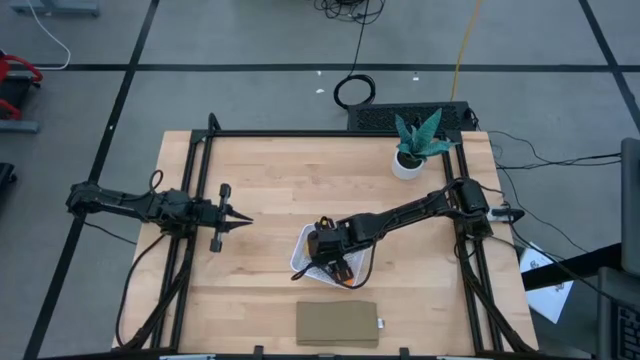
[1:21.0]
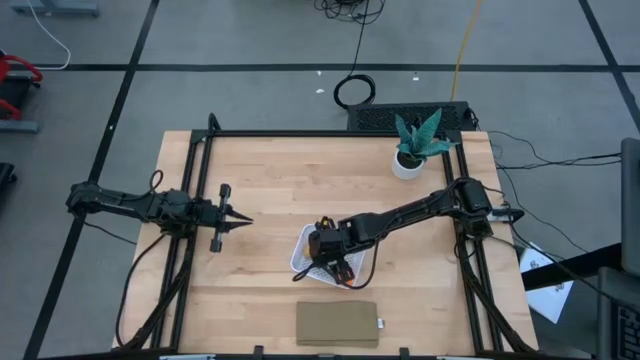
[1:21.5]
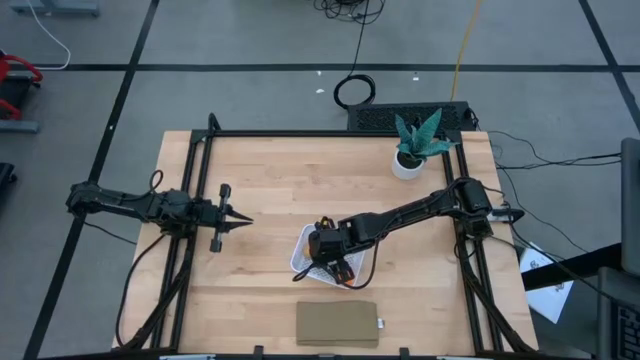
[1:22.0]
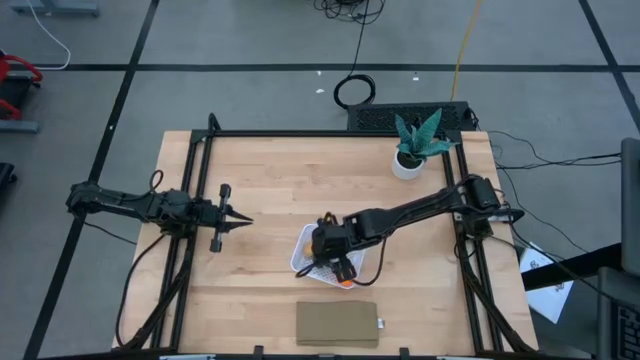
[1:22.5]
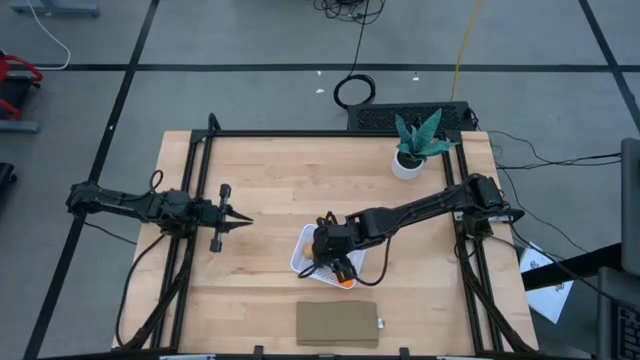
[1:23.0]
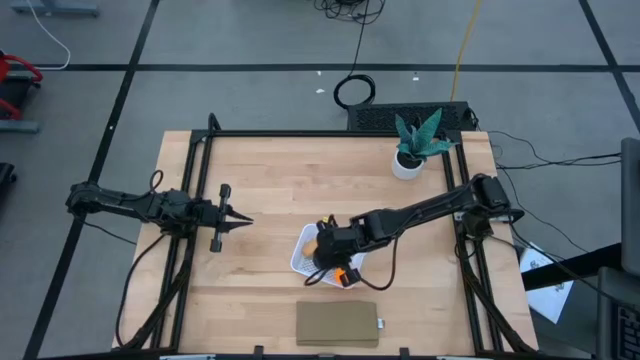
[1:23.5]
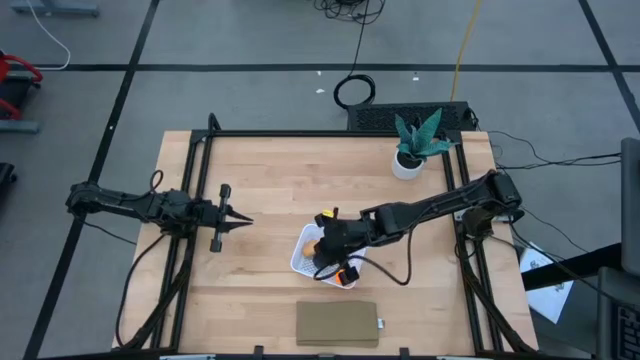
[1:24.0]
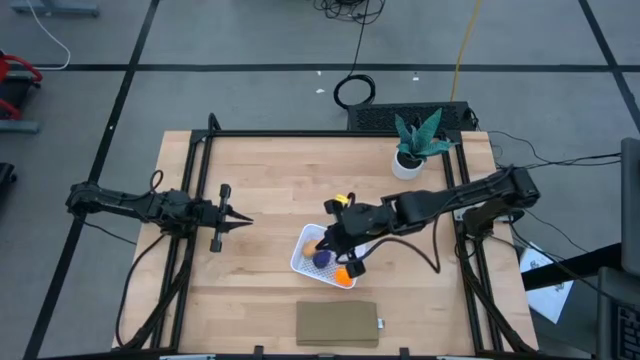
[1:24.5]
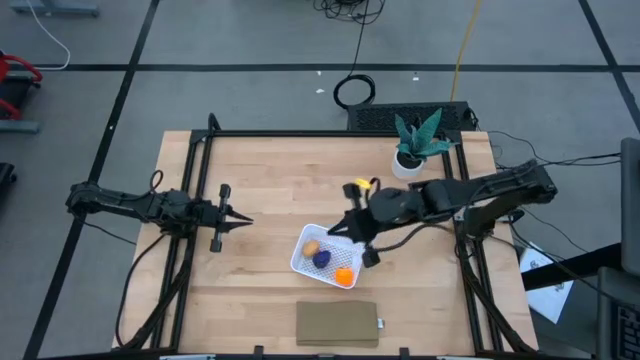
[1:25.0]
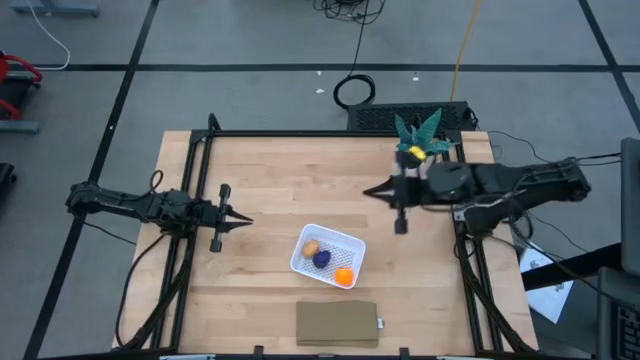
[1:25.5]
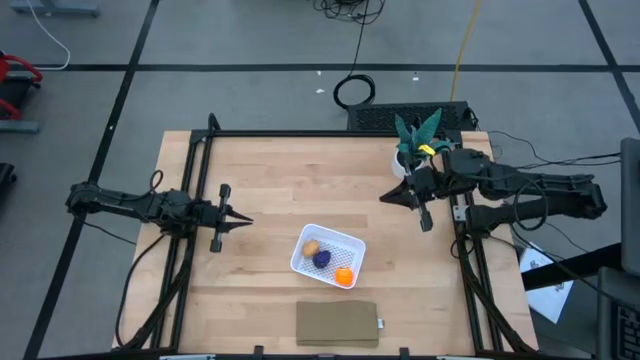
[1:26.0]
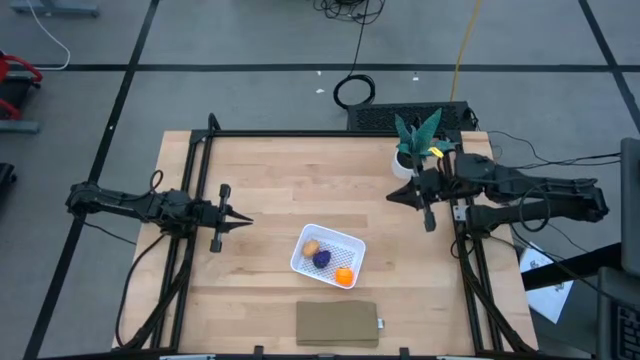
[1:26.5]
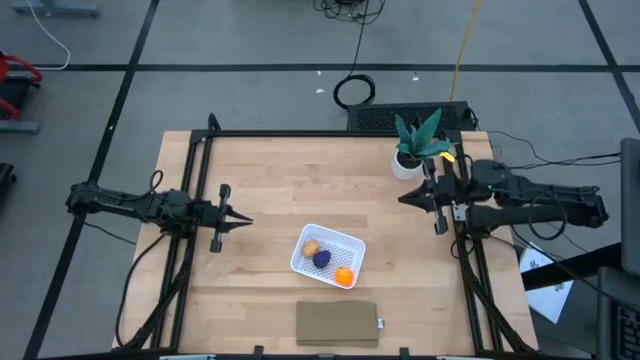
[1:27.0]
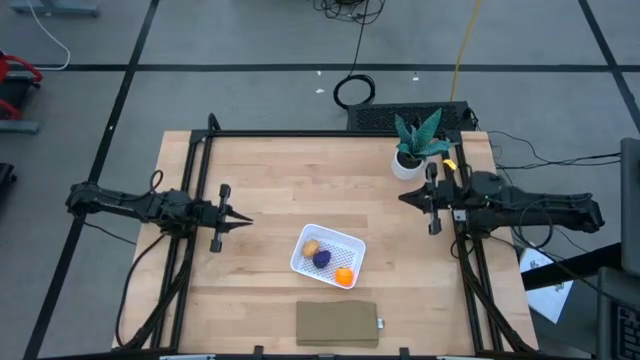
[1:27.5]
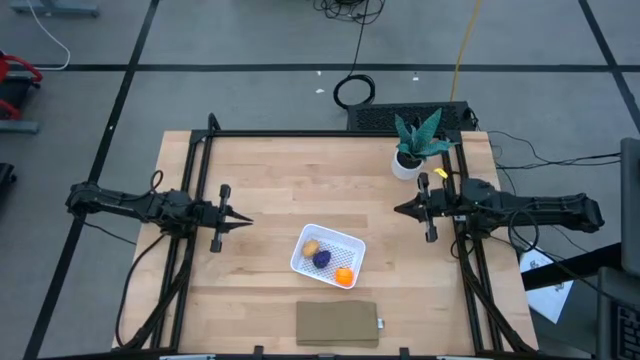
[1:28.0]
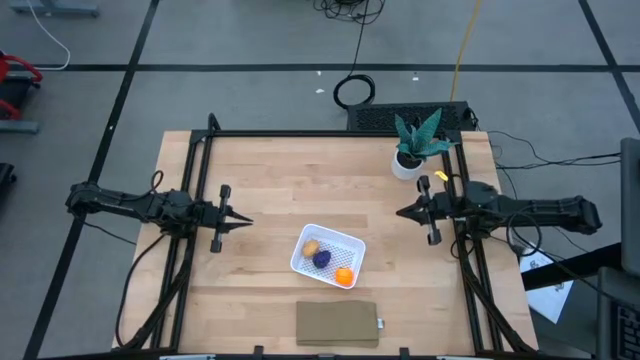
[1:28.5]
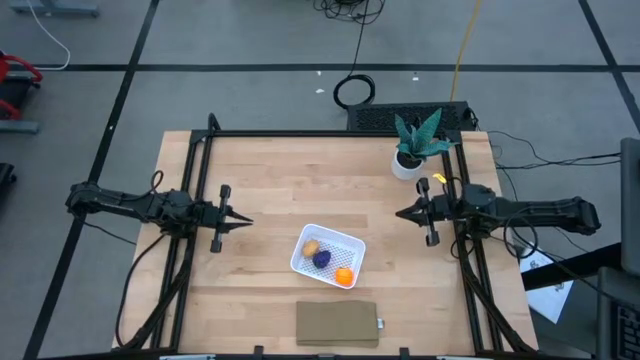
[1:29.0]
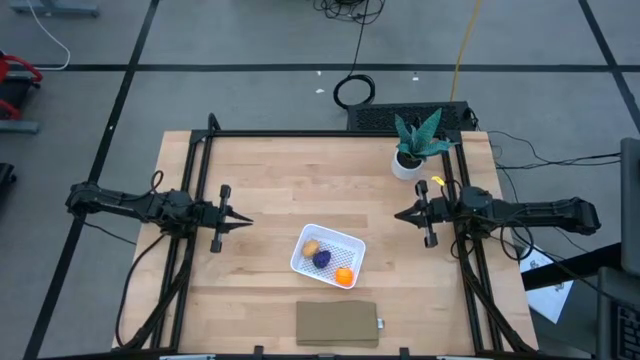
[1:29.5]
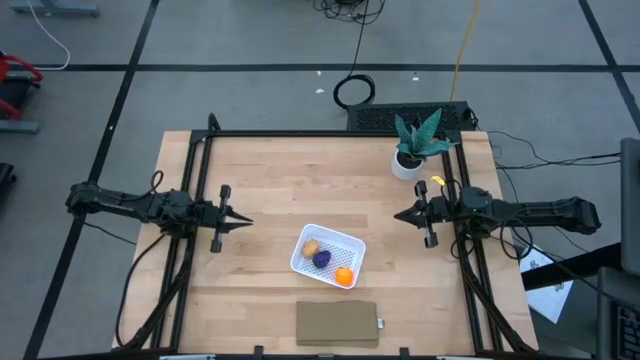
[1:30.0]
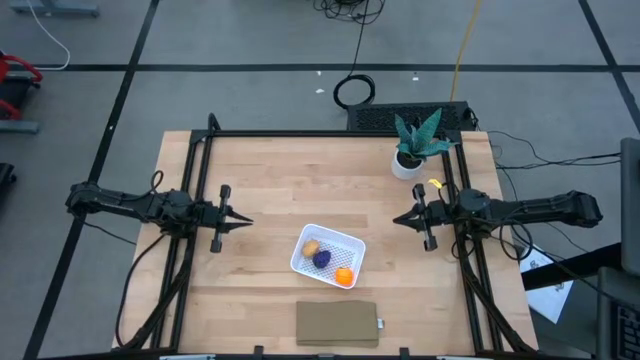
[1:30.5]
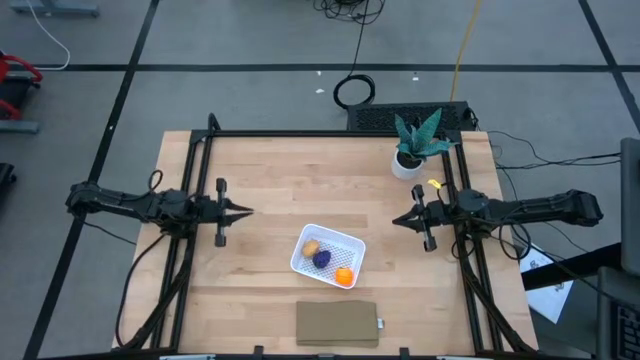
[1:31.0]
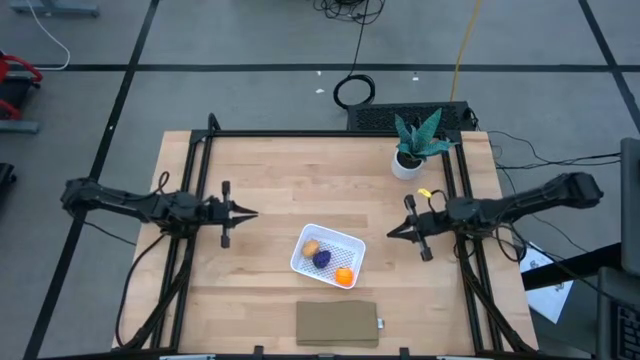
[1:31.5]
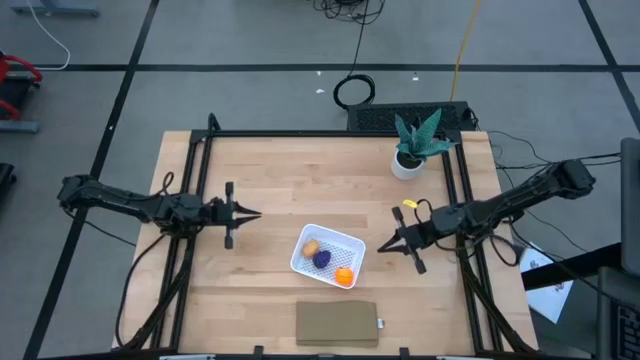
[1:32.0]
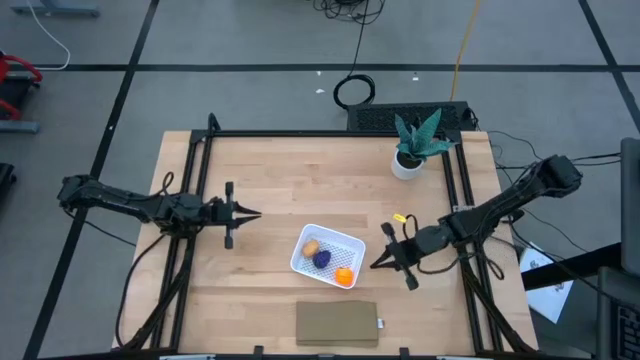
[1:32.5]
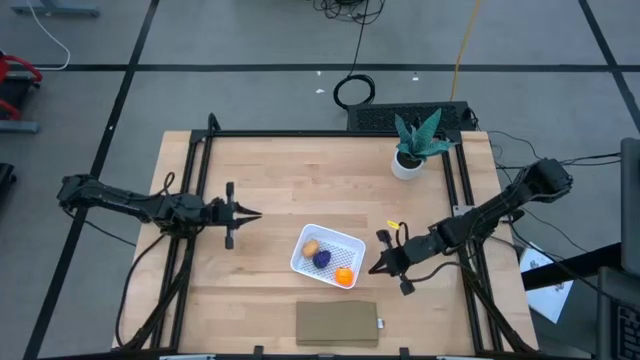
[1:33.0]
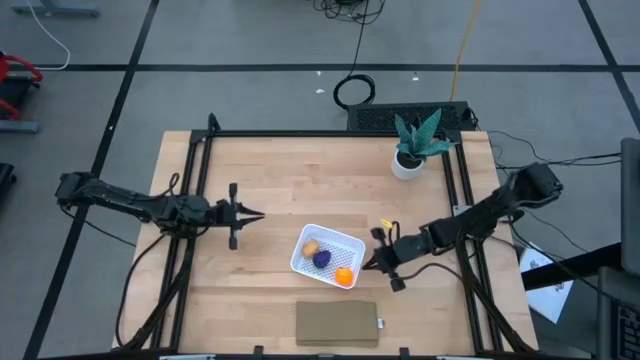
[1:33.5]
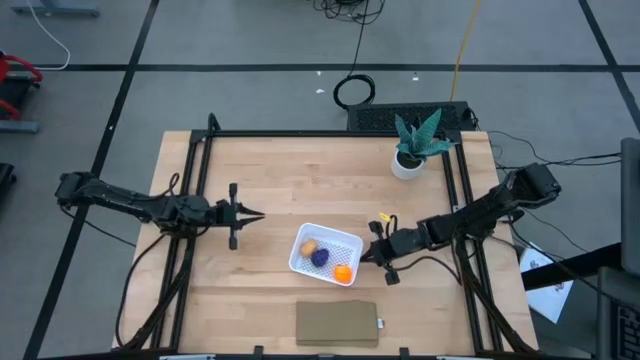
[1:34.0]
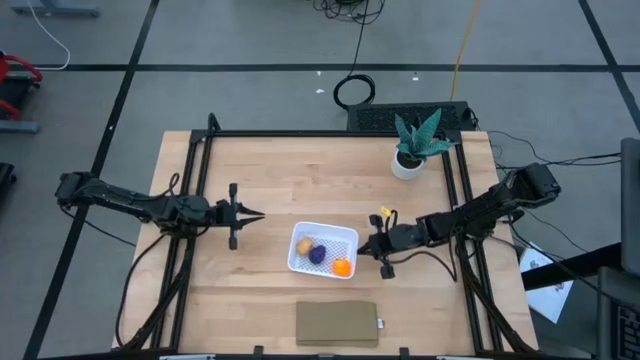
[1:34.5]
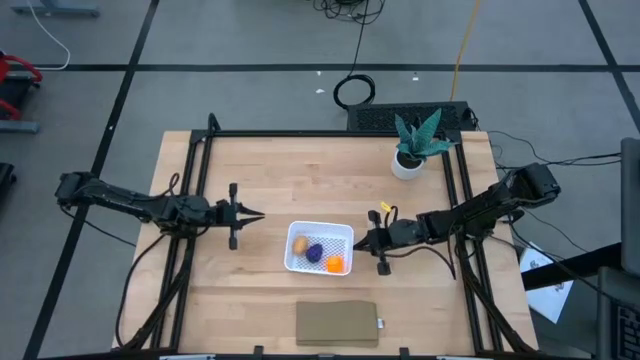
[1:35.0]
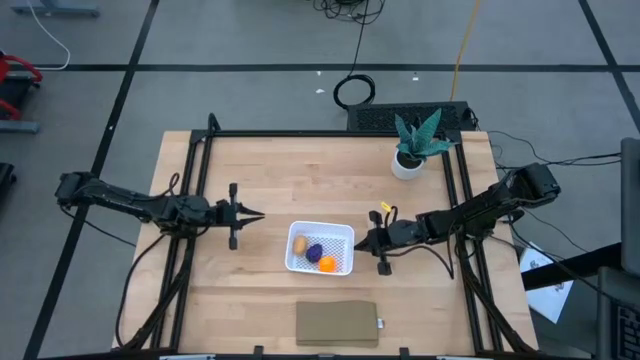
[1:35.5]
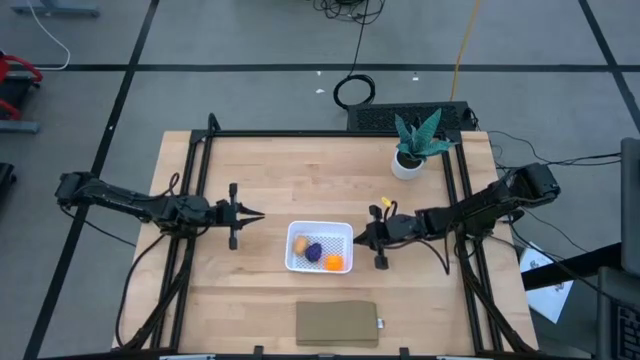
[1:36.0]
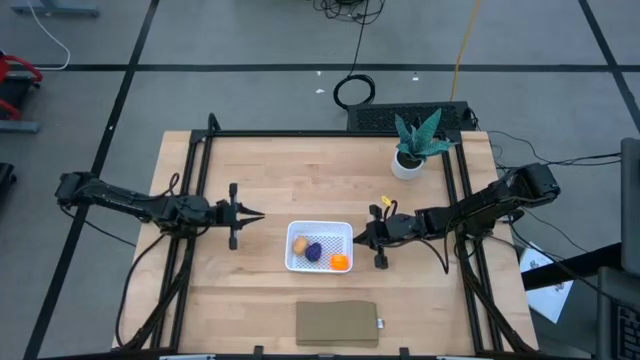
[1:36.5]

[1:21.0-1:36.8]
Task: Pick and placing Produce into tupperware
Adjust the basket

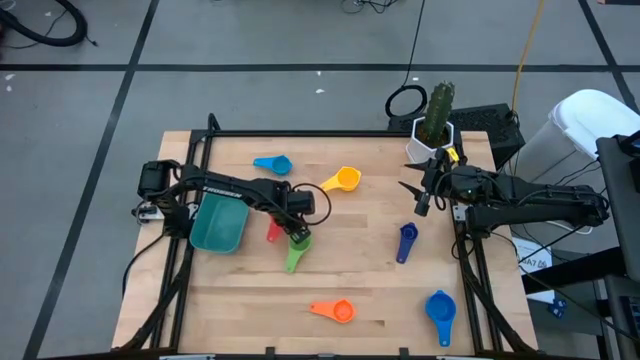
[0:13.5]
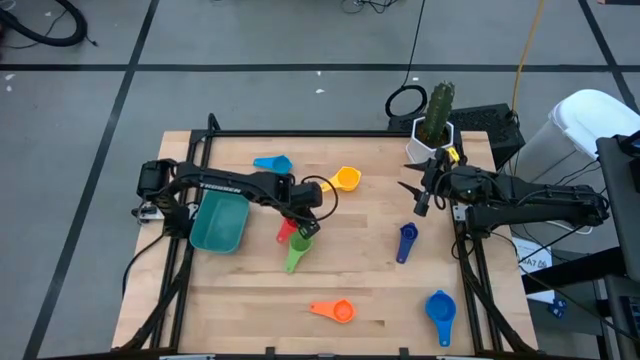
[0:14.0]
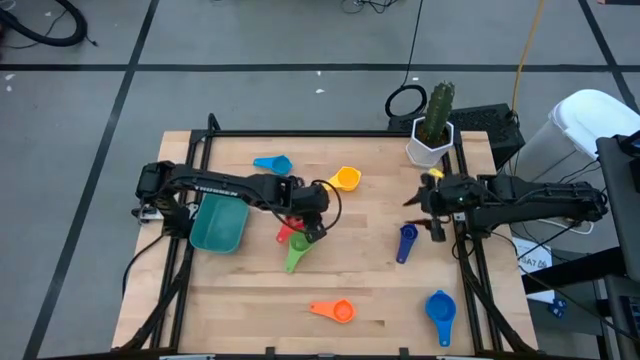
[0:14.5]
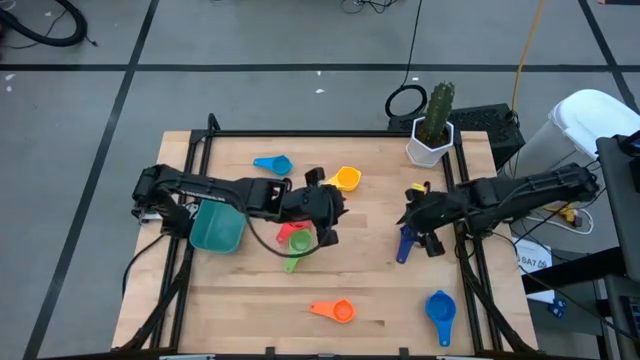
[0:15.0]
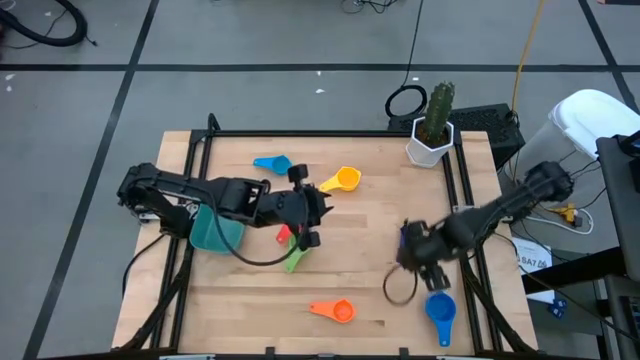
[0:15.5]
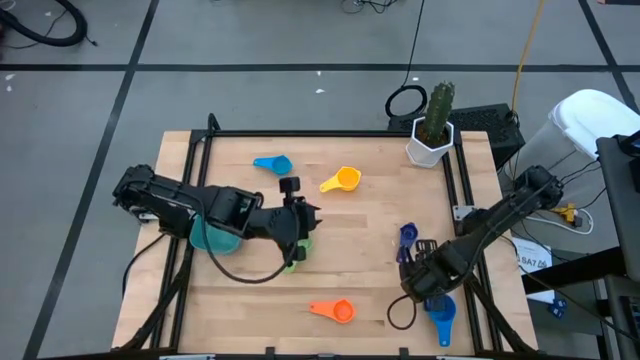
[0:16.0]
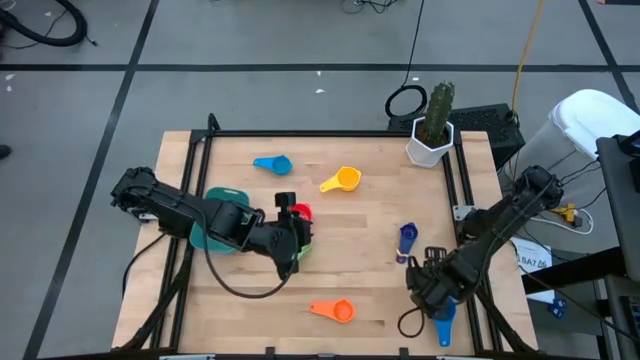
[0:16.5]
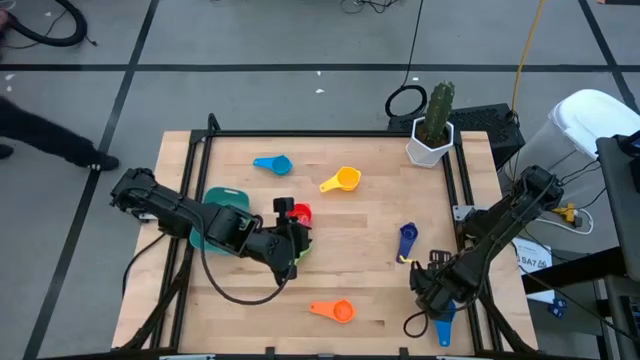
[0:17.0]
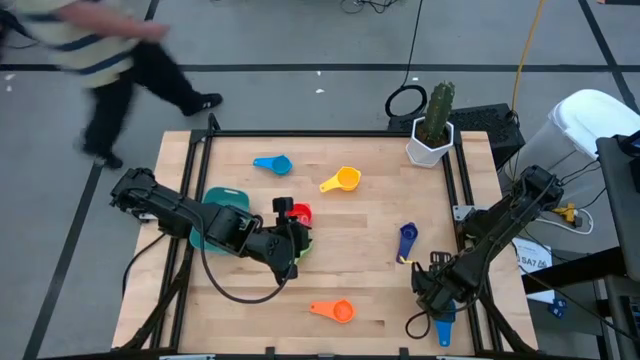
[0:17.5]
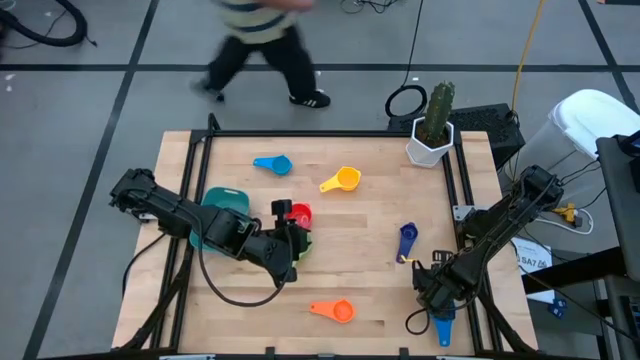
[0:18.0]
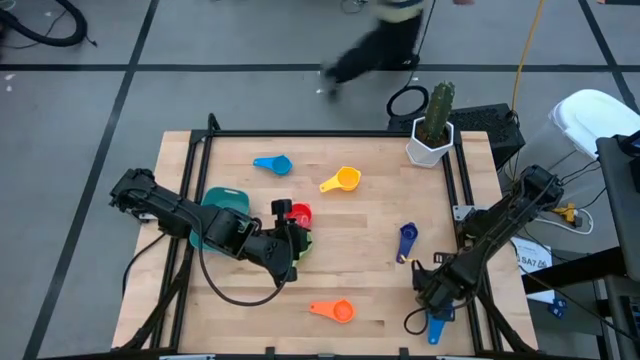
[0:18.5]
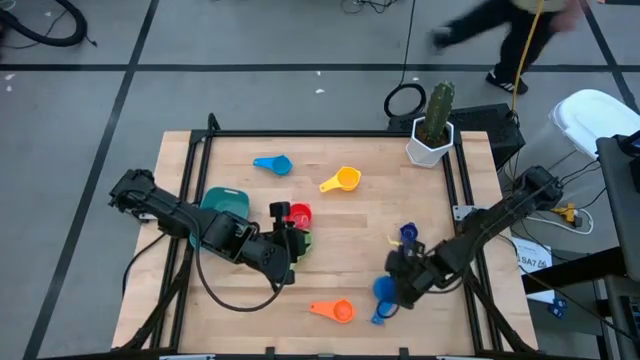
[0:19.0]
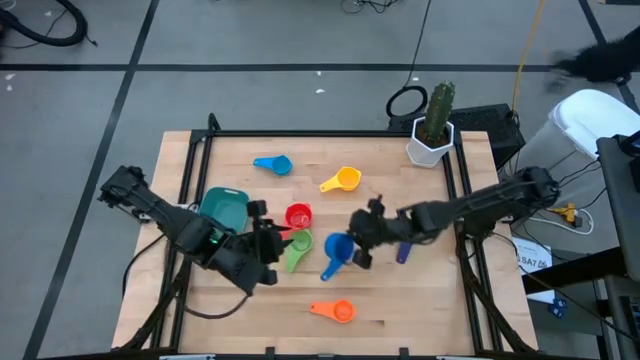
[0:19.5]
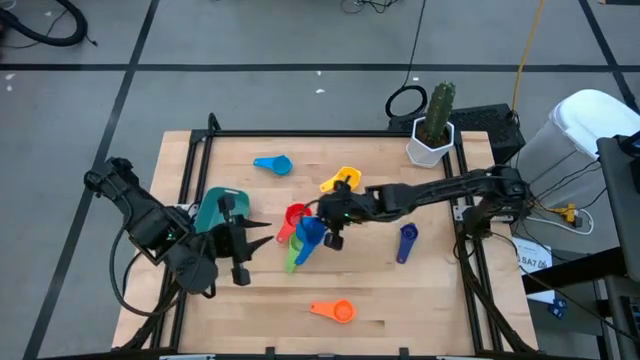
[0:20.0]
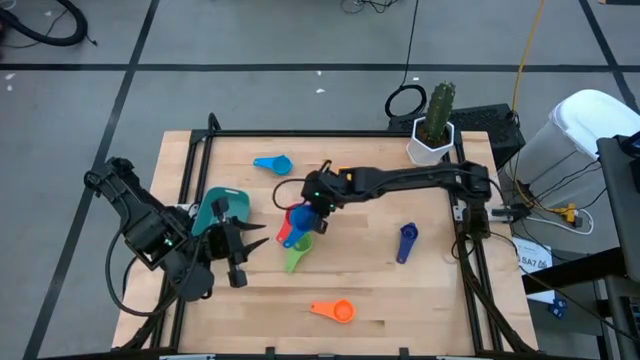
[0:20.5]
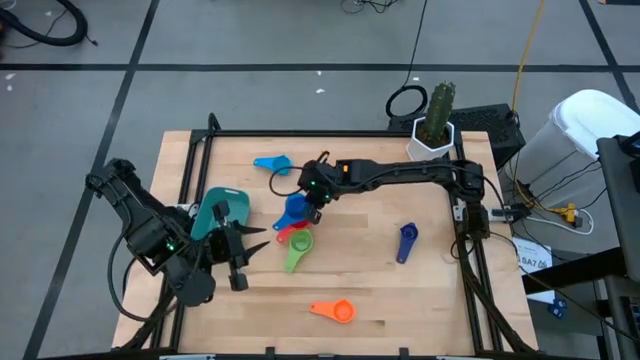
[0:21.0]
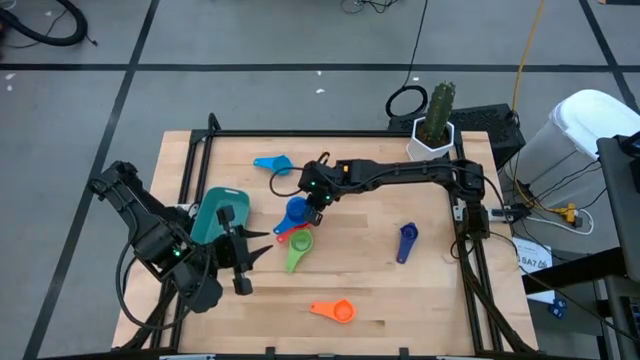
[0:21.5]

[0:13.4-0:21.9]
Task: Nest measuring cups in basket
Stack the blue measuring cup into the red measuring cup
